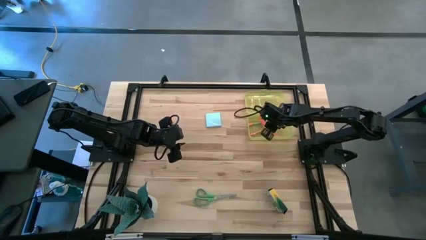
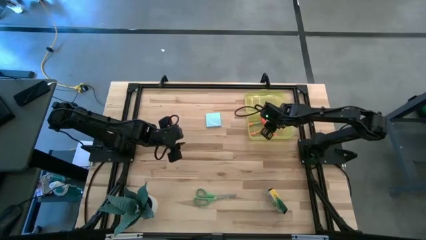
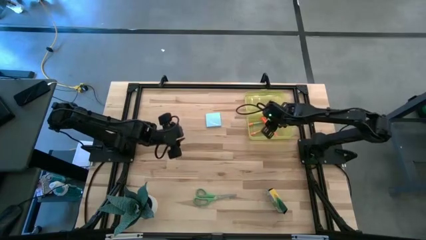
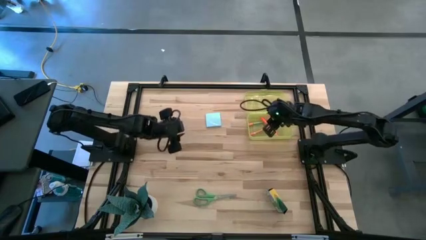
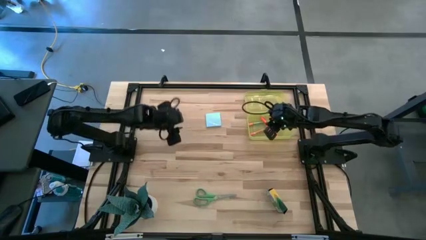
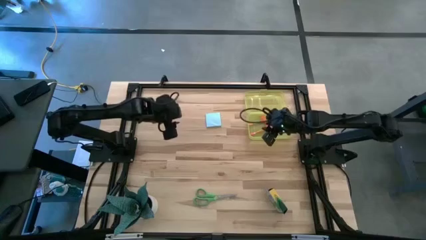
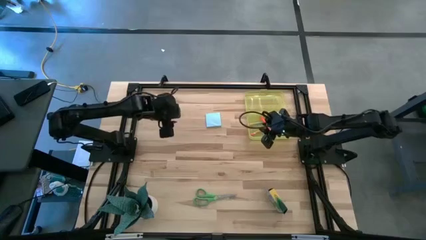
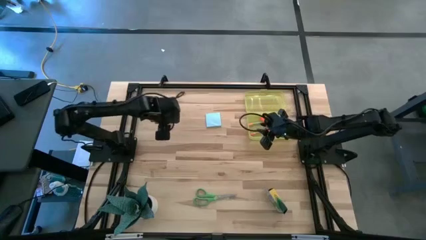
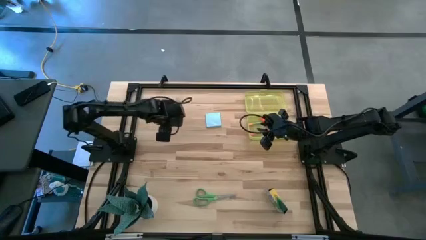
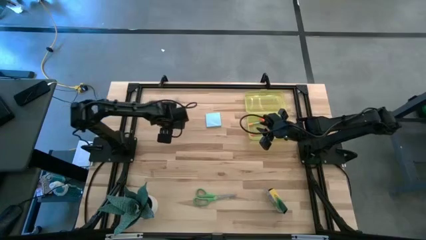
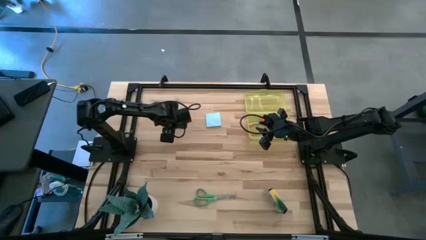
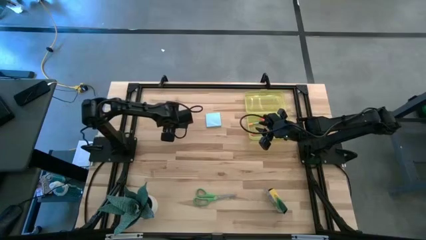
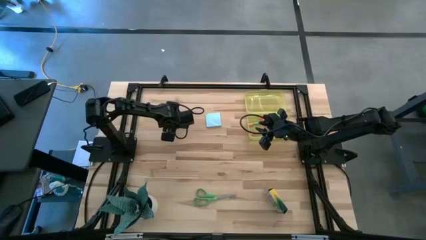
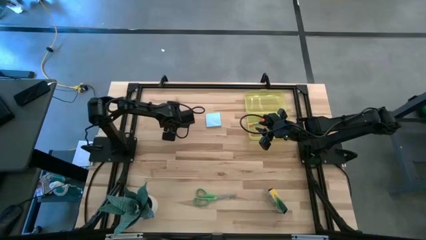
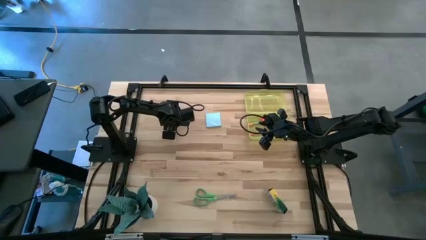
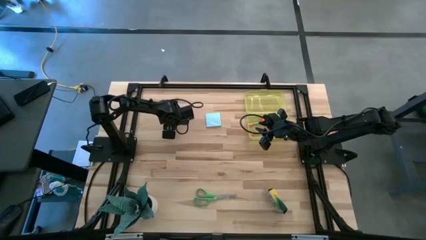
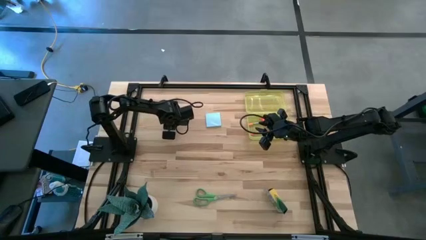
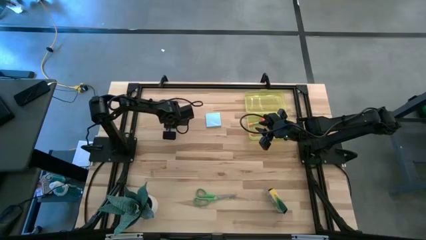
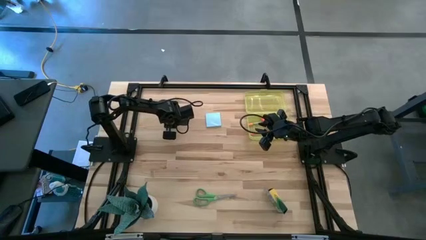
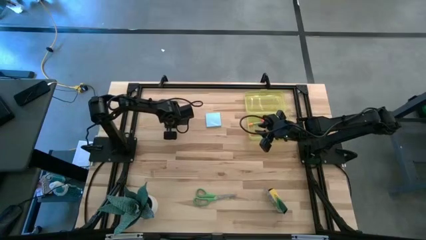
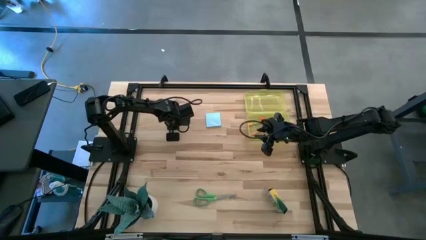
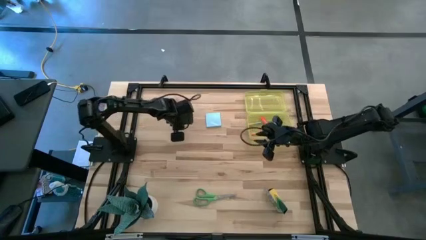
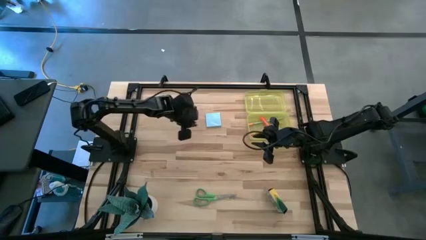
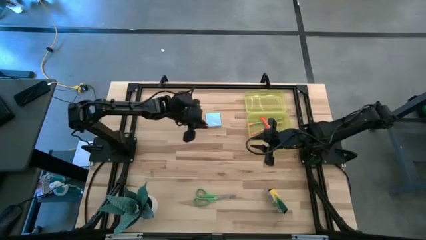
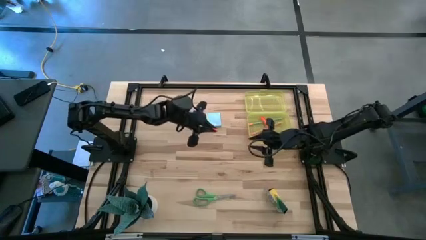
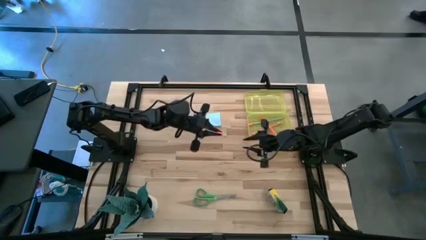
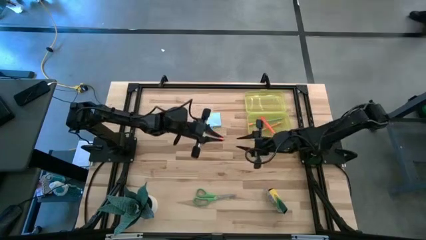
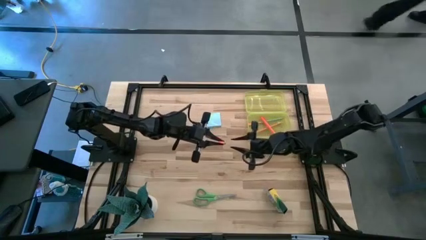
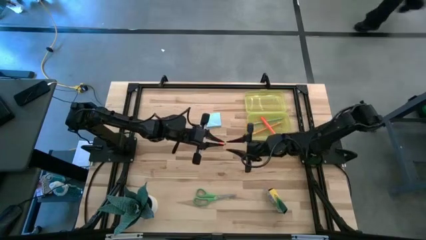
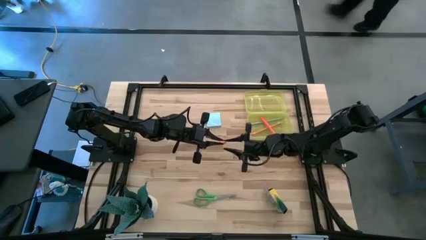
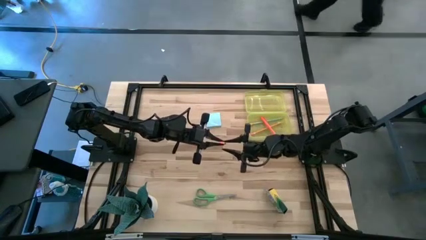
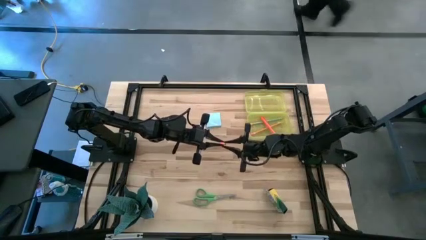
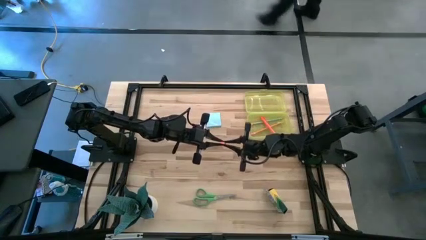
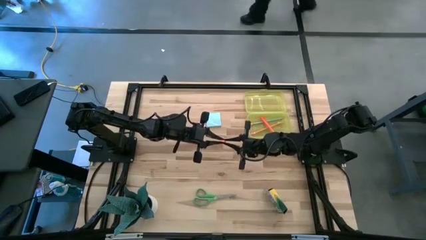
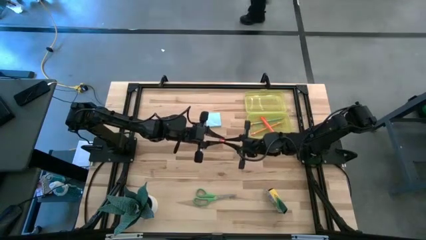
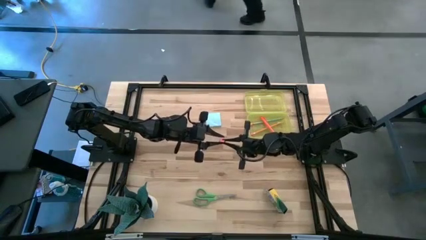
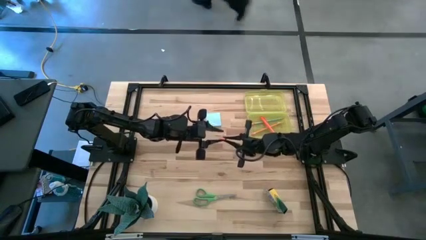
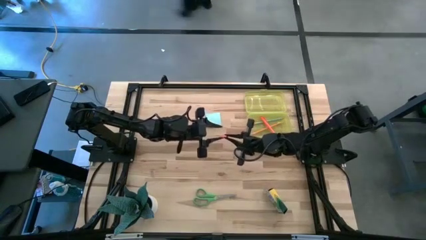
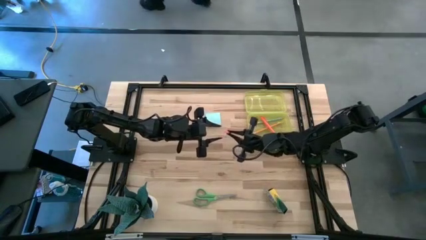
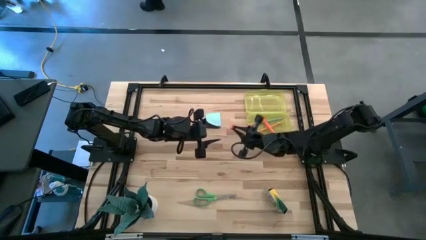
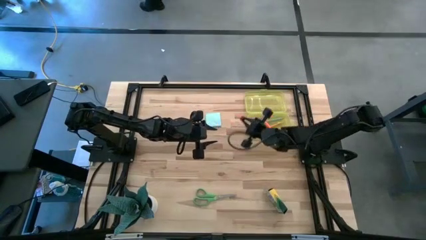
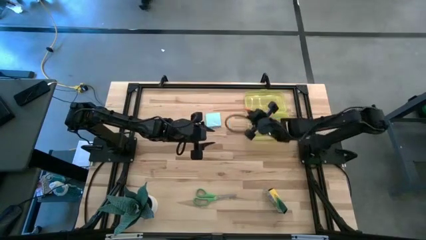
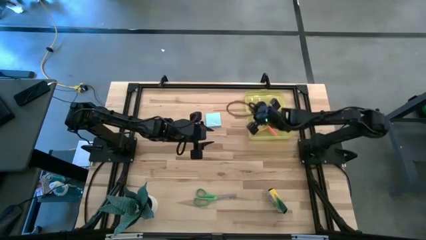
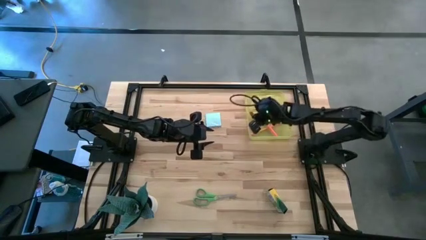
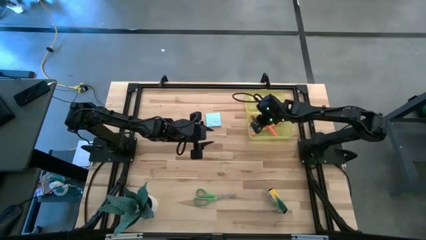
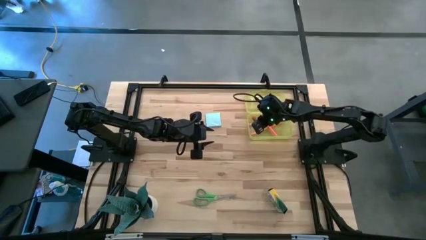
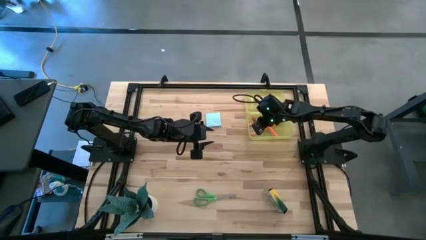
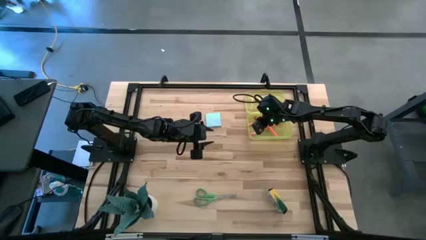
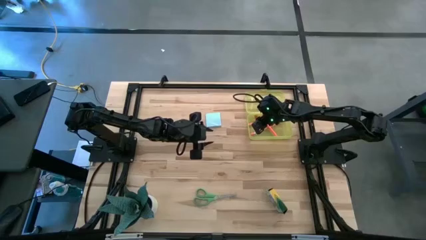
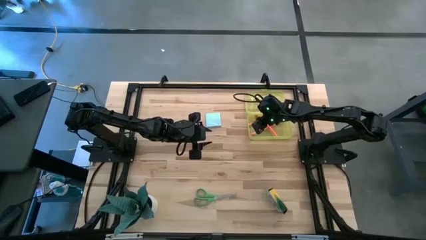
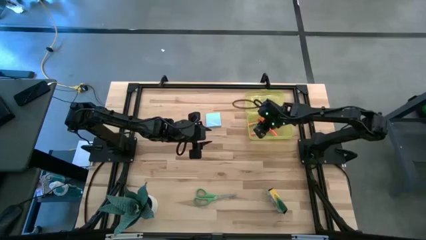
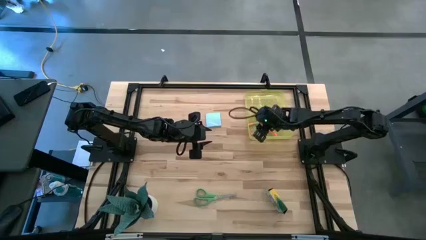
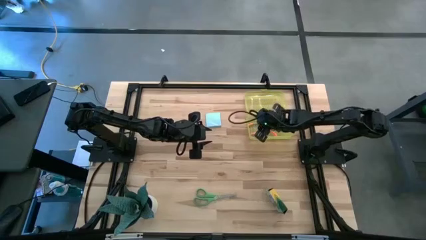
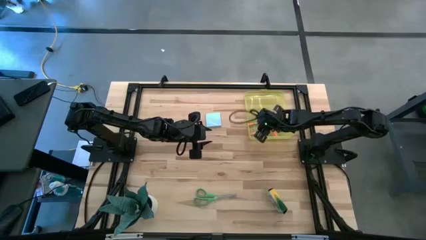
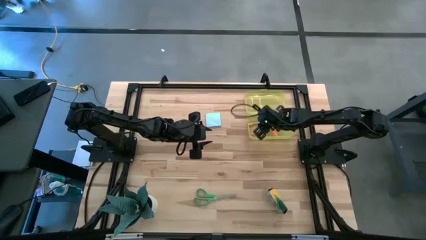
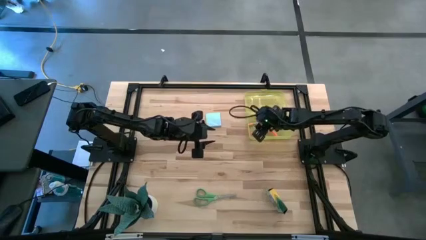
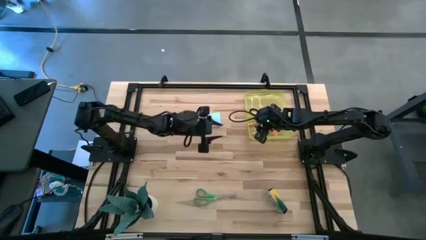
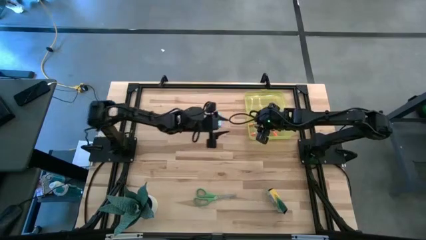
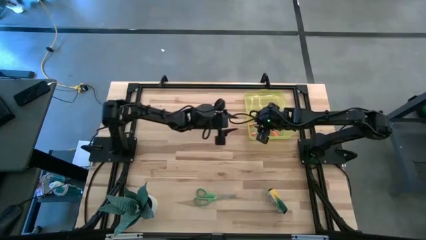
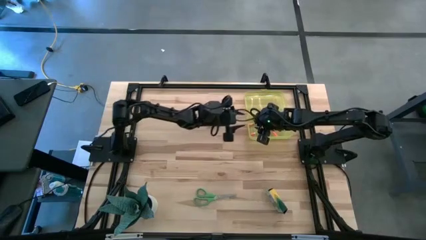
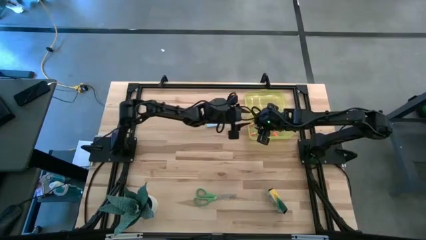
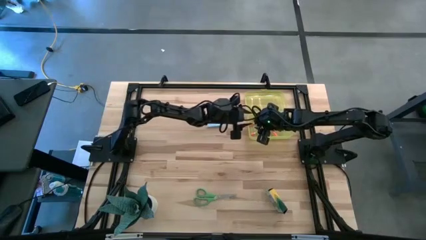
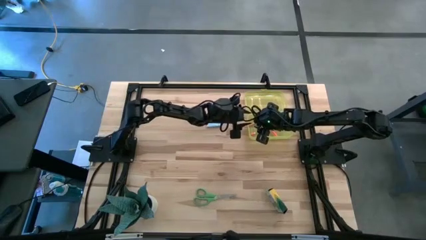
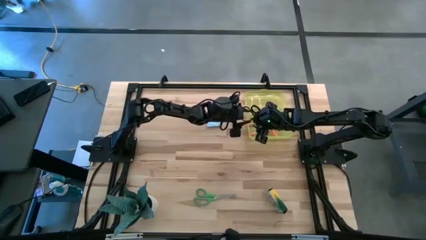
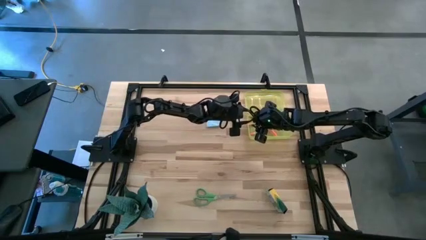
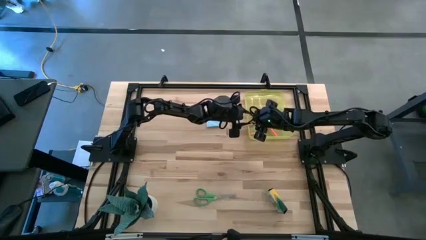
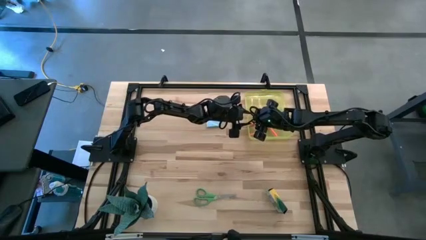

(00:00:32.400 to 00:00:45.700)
Task: Pack school essentials
Put the orange eraser into the yellow storage box

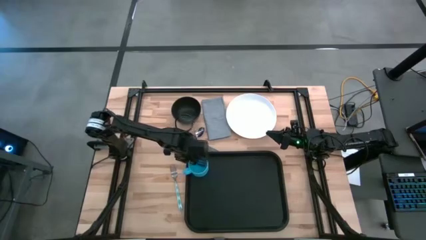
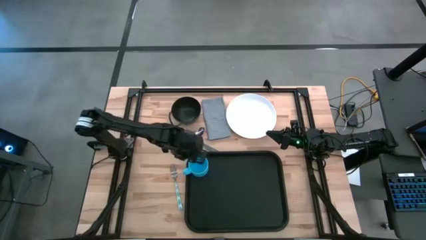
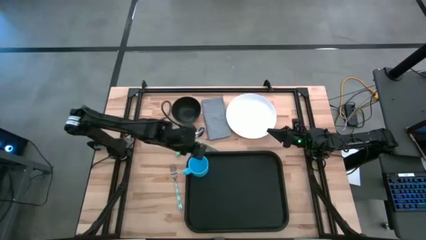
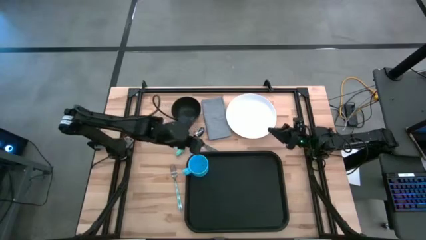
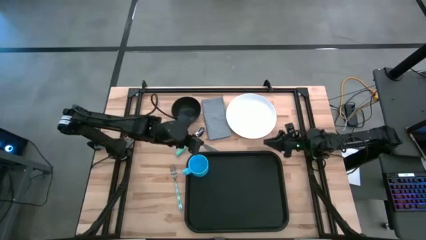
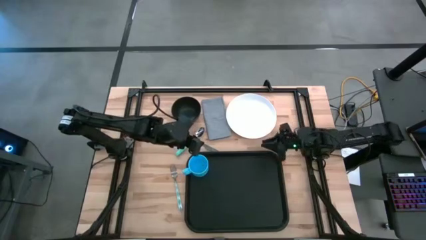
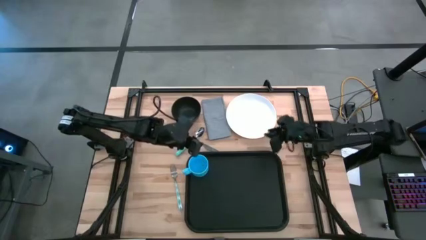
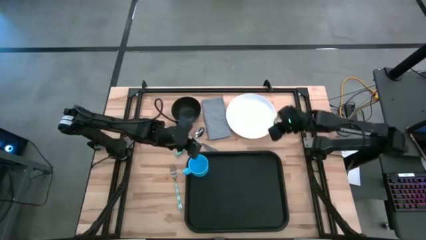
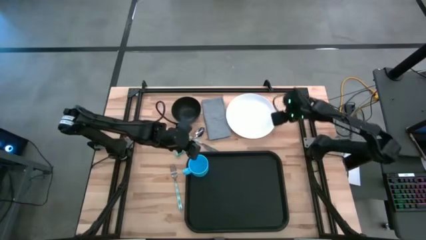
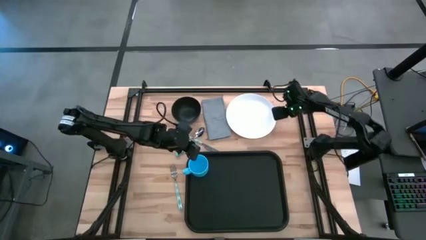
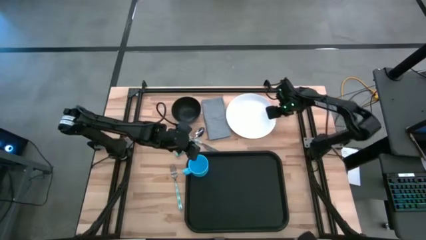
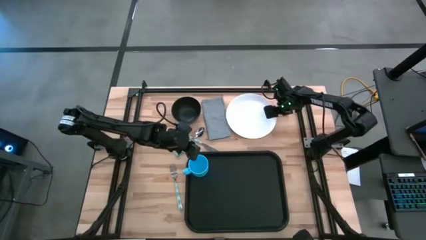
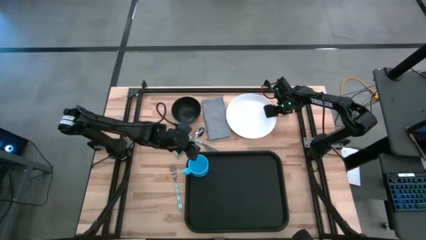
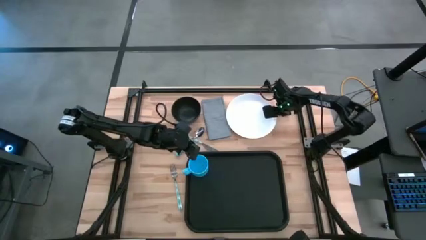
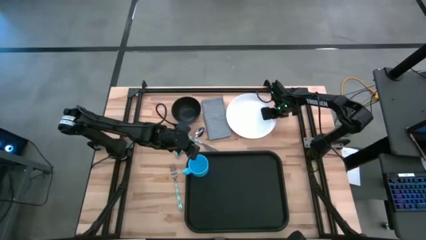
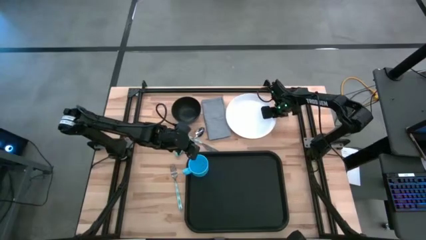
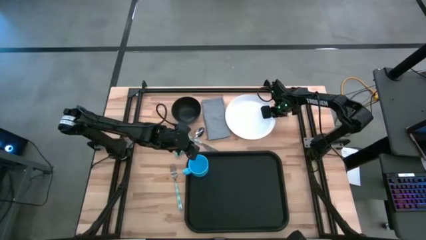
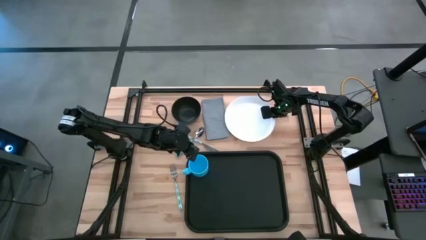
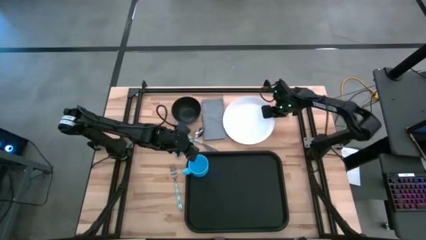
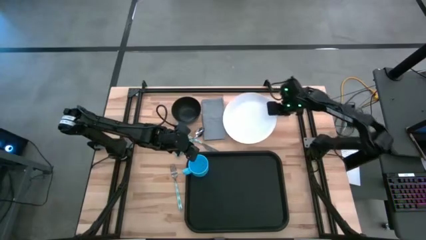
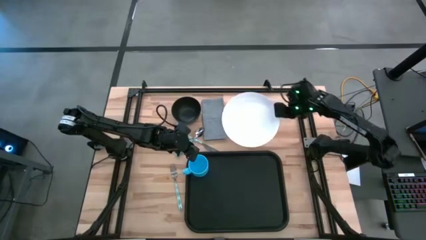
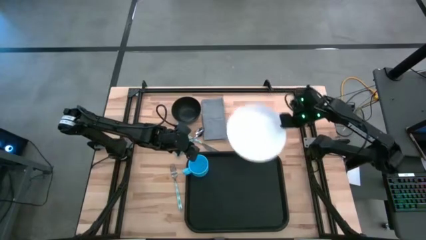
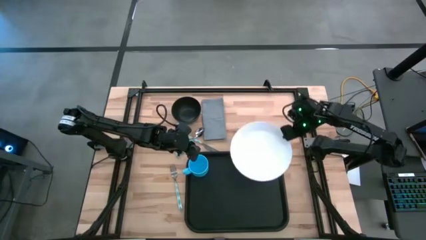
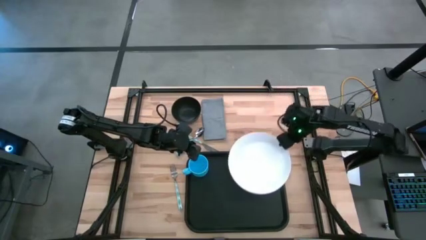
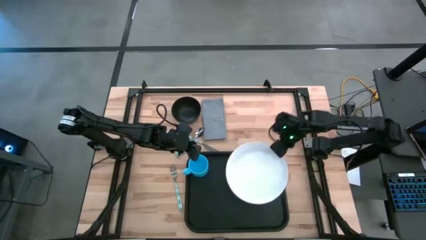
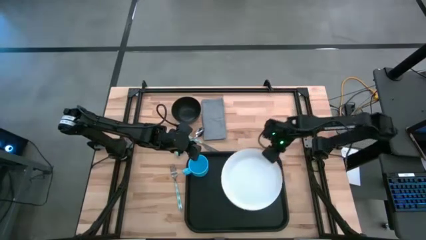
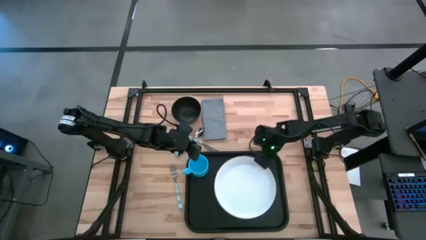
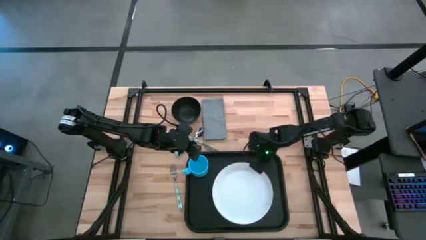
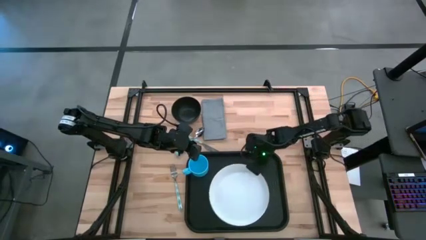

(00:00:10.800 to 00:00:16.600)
Task: Set up tray
Put the white plate on the black tray
